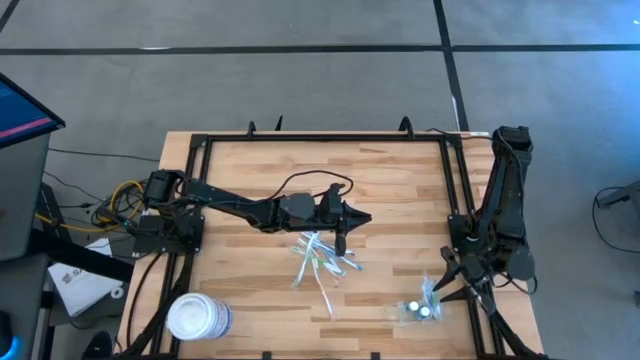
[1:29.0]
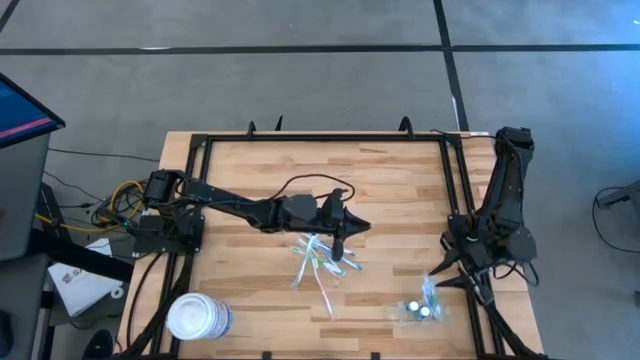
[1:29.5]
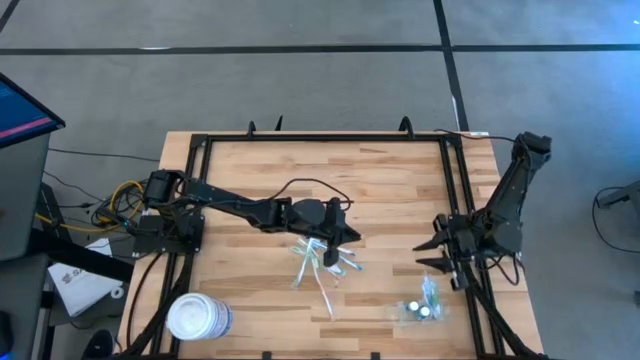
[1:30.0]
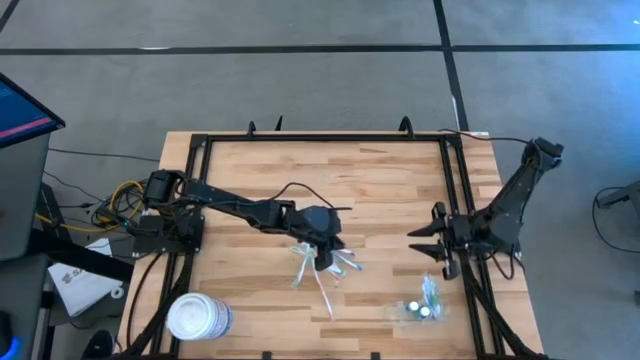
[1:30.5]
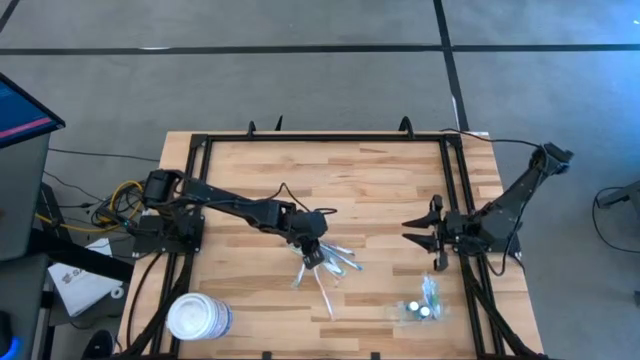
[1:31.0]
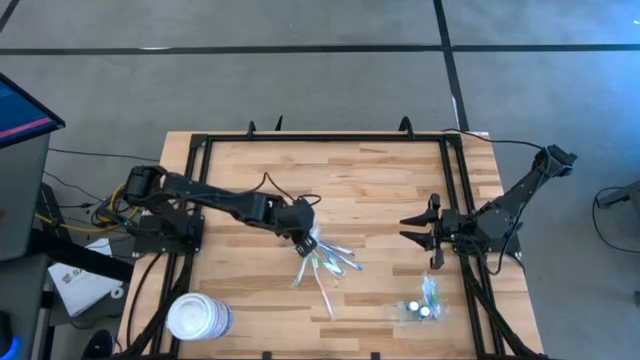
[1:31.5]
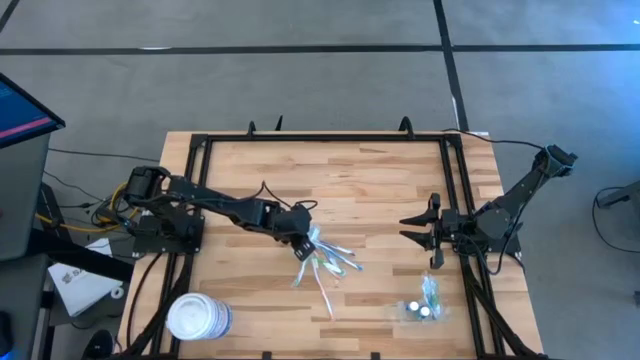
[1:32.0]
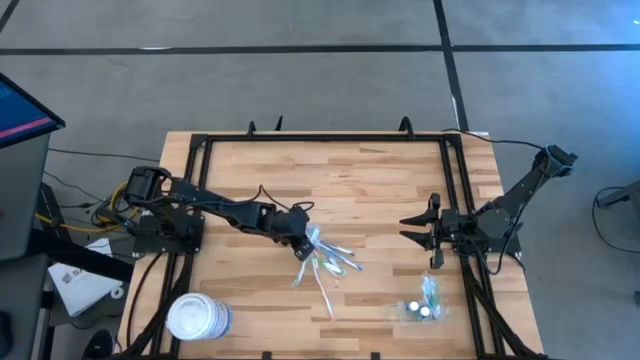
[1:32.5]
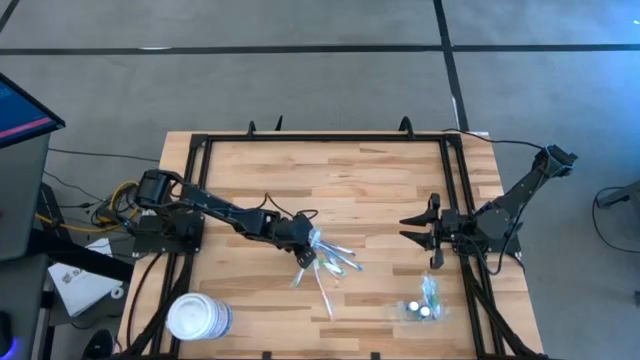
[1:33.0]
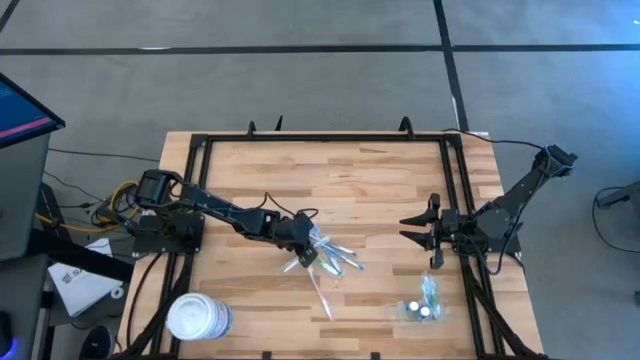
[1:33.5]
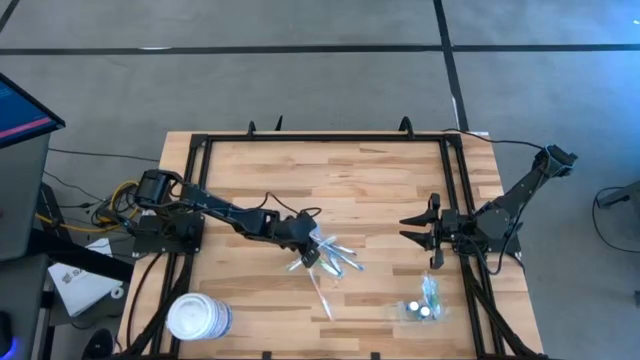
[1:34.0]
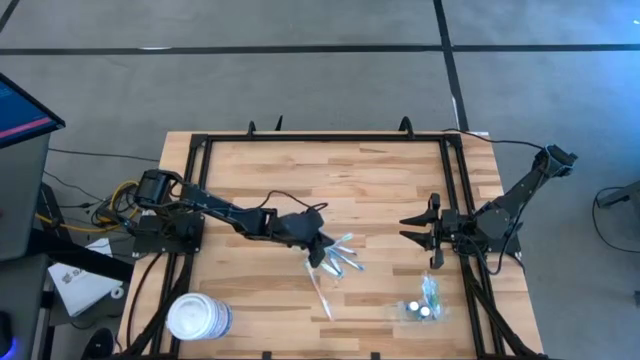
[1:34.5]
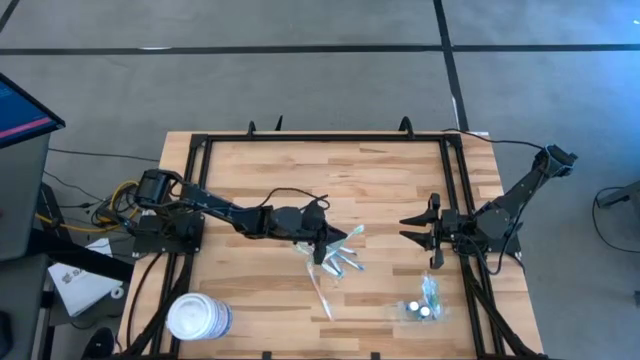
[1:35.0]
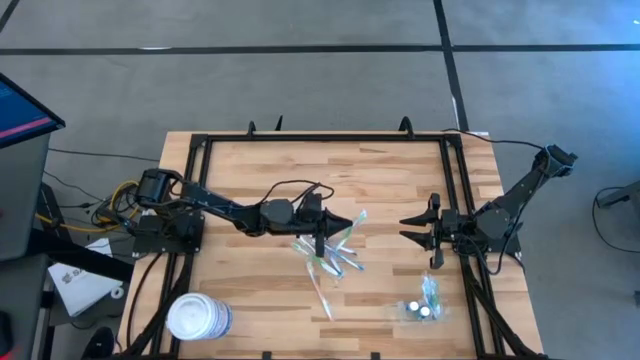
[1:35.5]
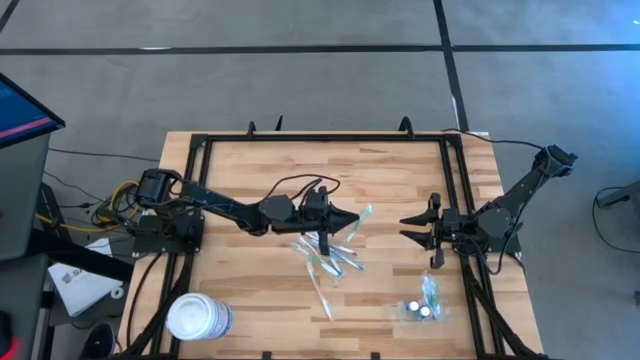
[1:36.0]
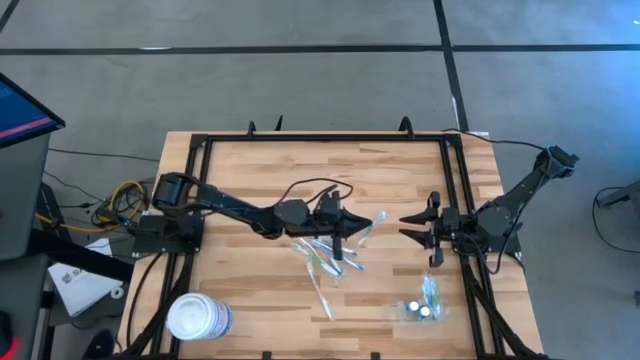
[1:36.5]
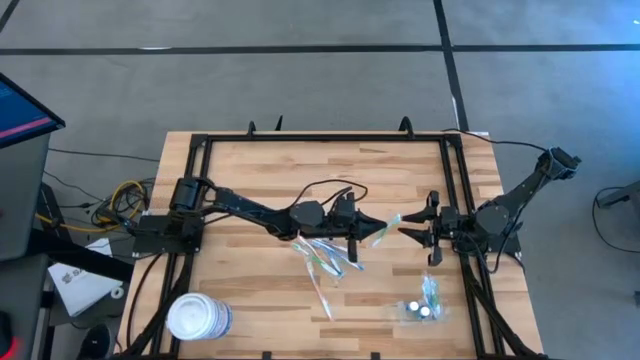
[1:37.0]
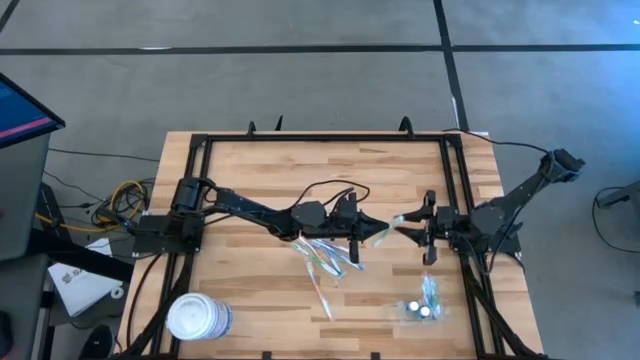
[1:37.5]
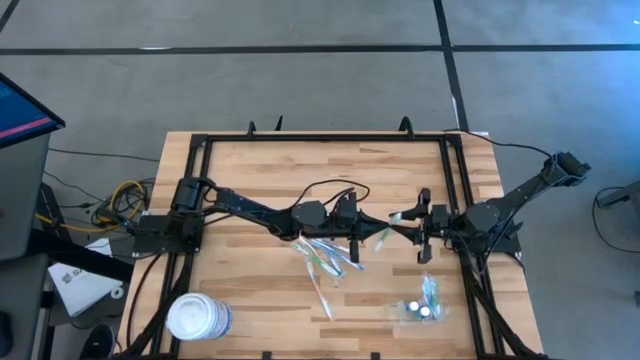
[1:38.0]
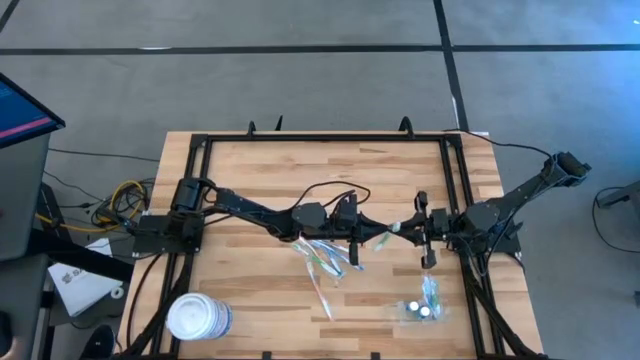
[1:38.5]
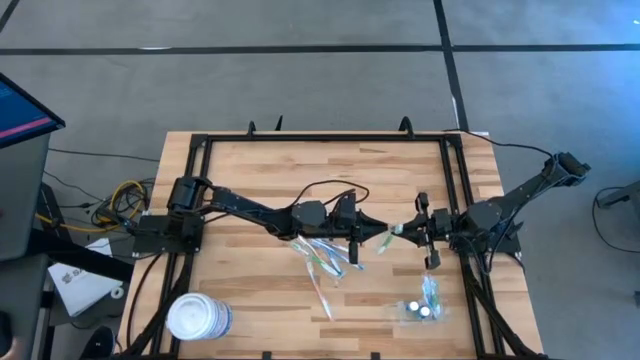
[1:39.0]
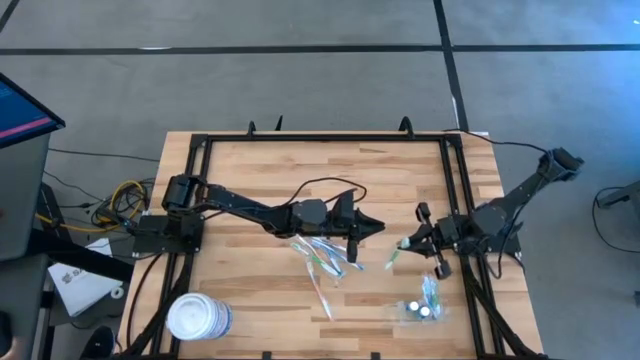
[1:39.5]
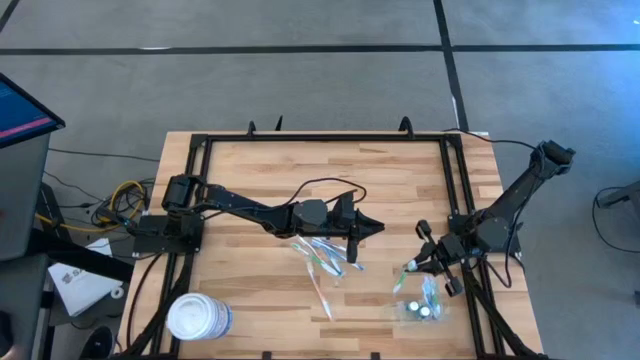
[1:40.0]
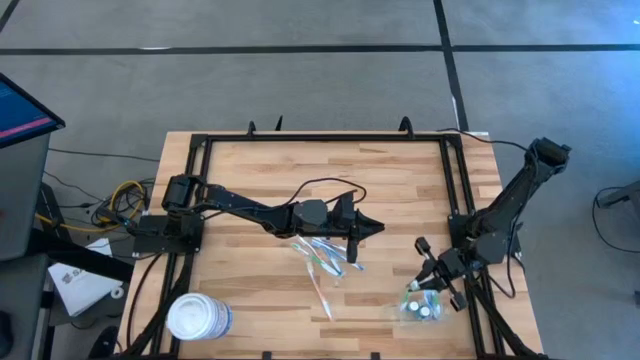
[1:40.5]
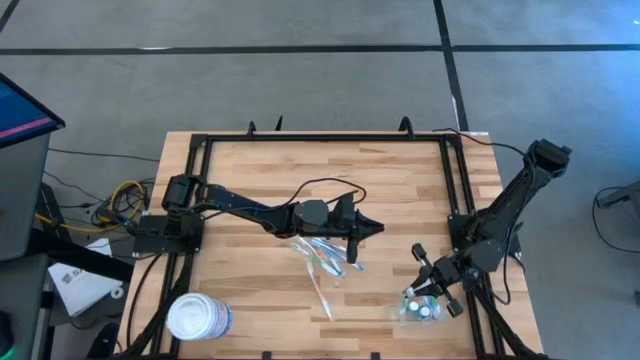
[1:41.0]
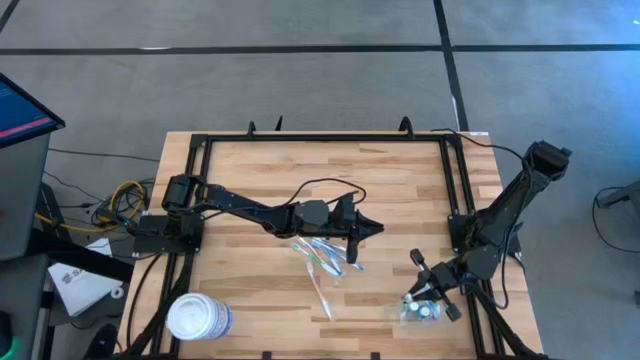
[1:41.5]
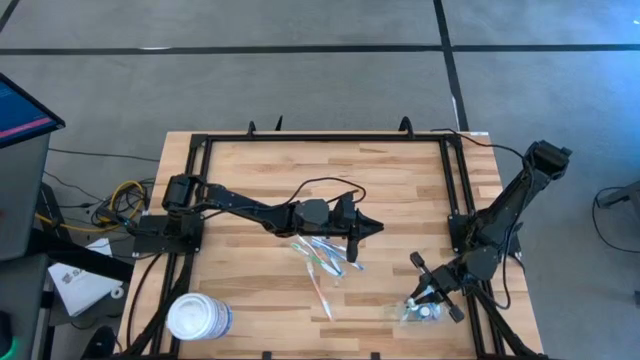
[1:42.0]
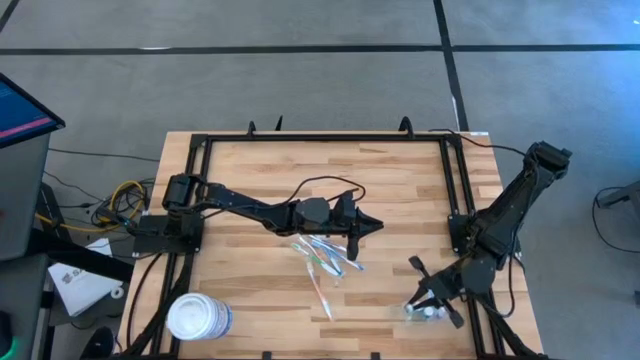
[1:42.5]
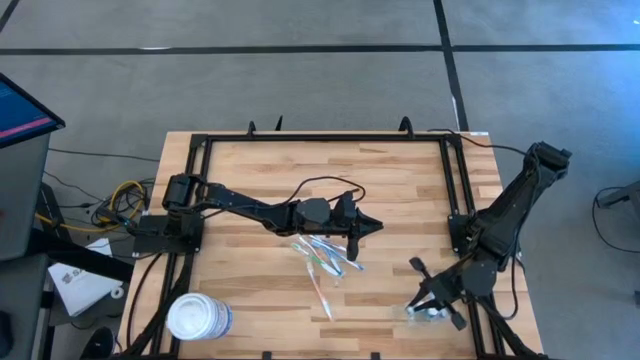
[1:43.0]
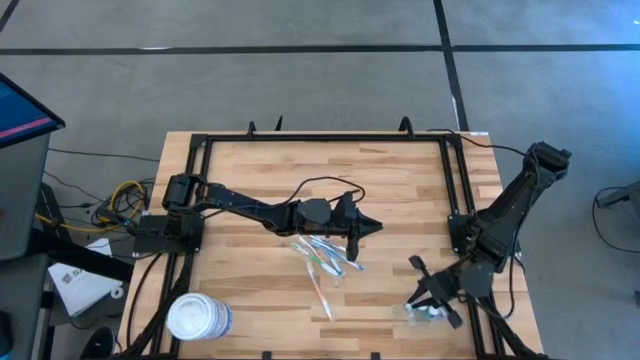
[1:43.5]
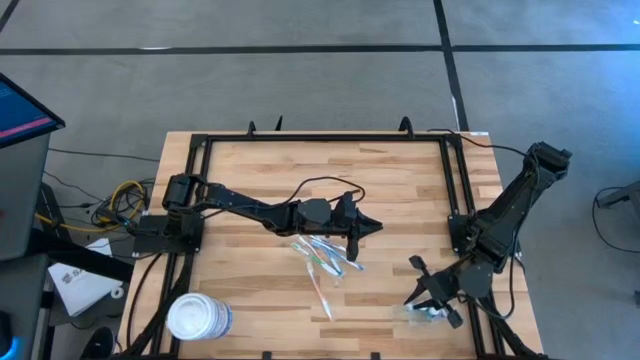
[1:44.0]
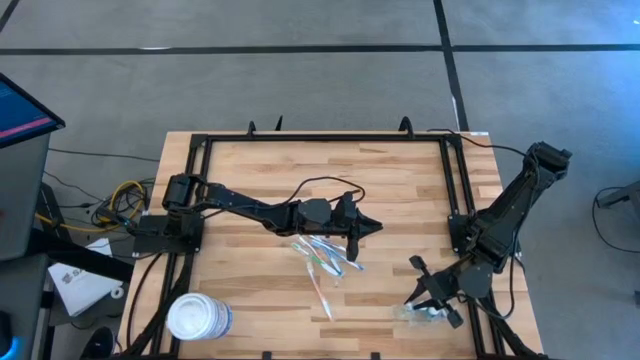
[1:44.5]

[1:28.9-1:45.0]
Task: Pick & Place toothbrushing station
Put the green toothbrush into the transparent organizer

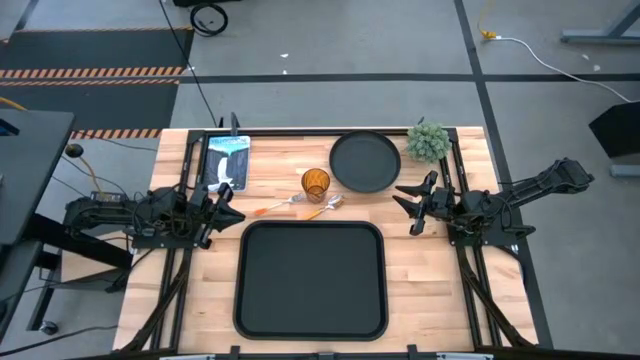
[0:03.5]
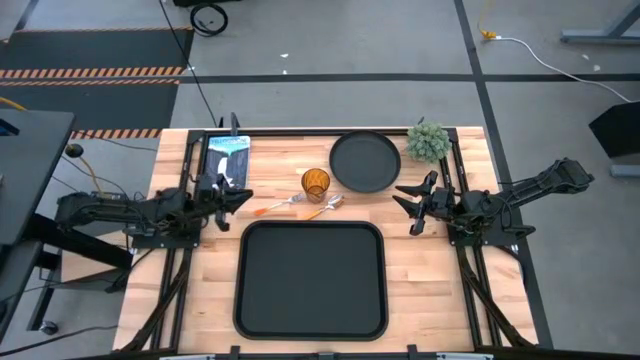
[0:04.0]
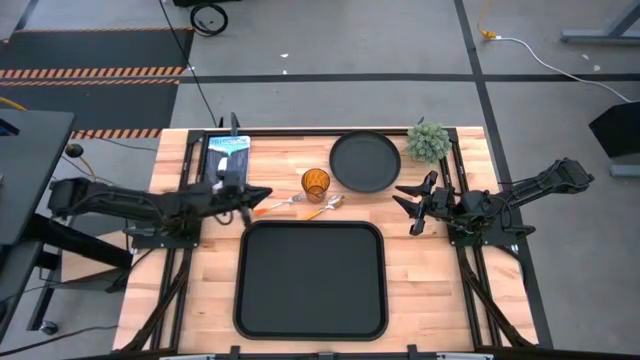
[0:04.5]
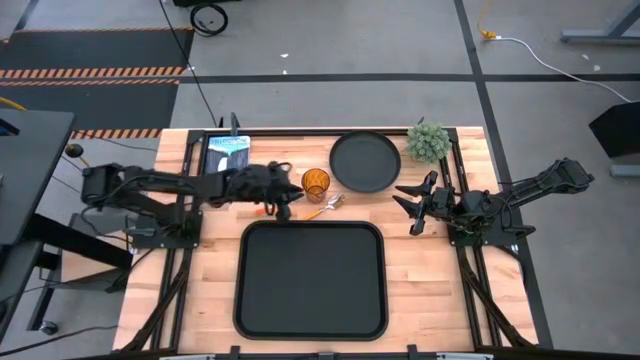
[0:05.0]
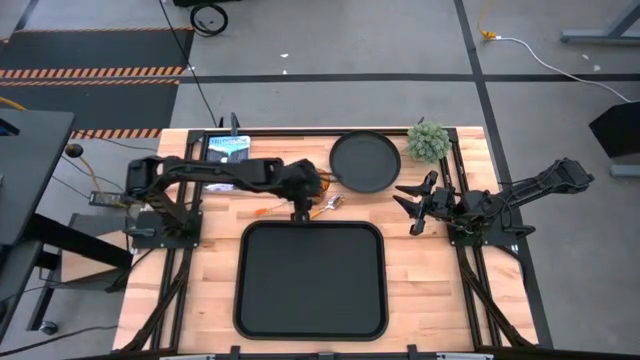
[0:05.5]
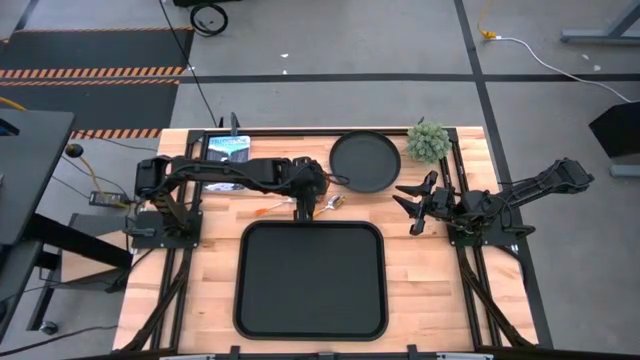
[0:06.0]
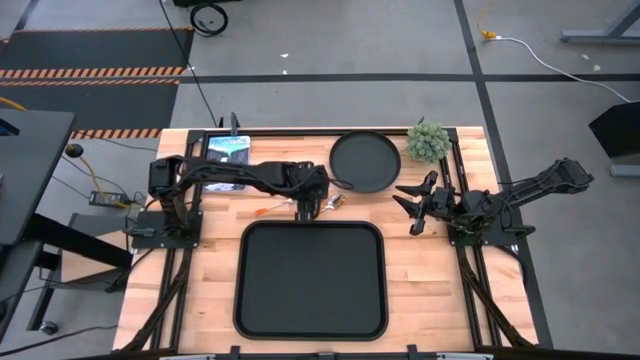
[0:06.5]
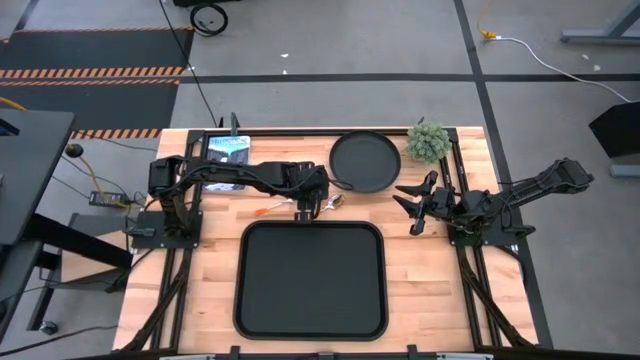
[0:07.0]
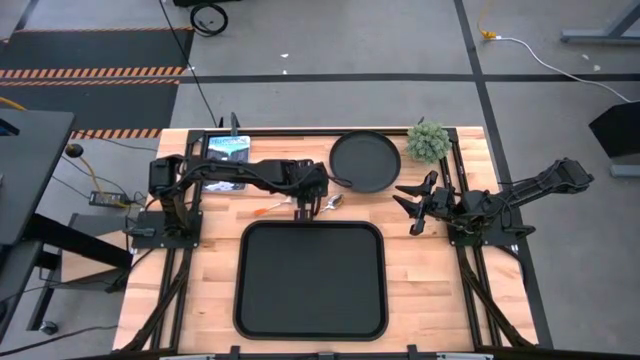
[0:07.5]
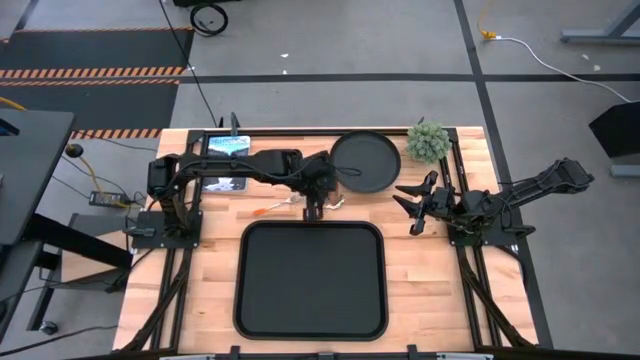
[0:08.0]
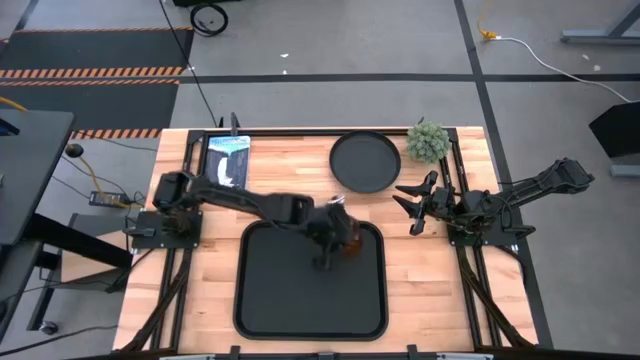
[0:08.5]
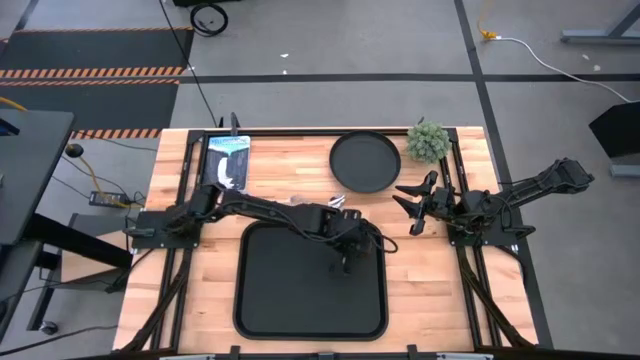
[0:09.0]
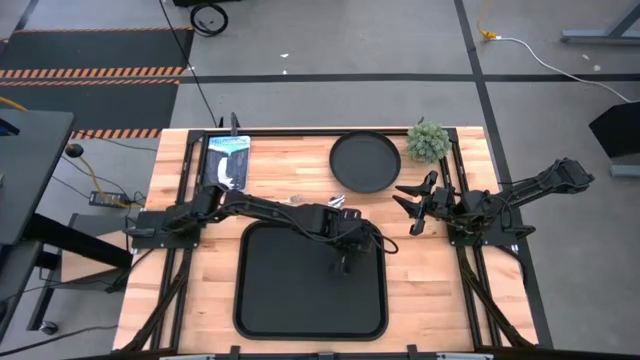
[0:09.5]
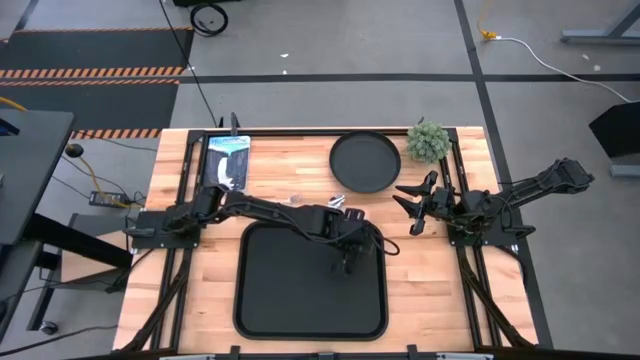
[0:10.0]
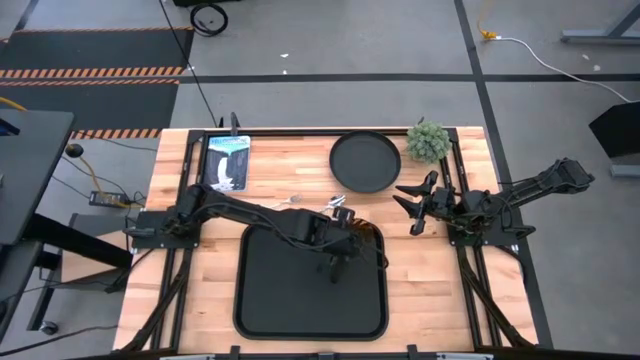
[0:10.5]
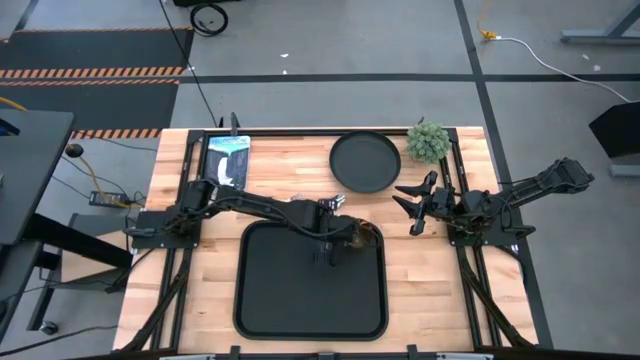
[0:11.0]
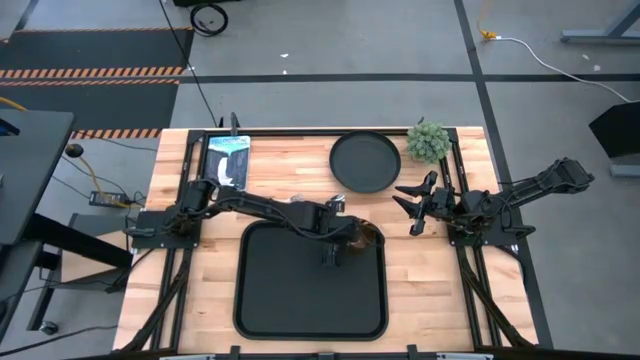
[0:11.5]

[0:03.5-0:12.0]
Task: Pick and place plate/cup/fork/spoon on tray
Put the orange cup on the top right of the black tray
